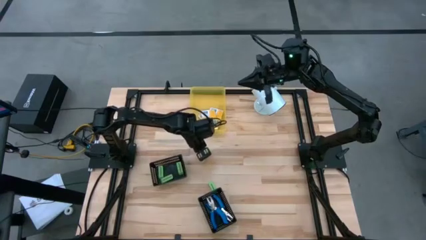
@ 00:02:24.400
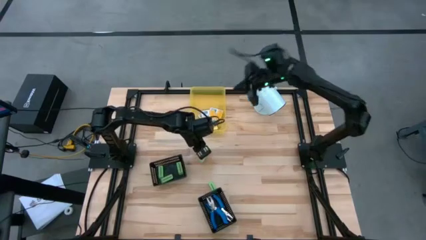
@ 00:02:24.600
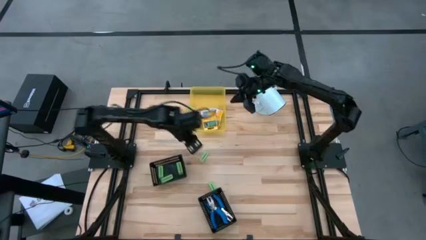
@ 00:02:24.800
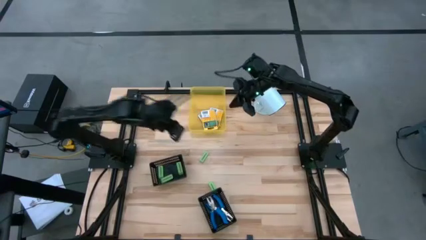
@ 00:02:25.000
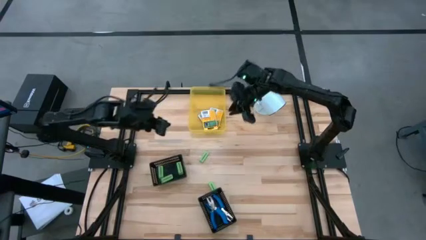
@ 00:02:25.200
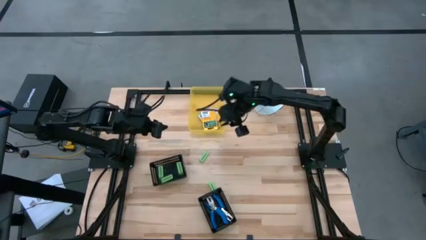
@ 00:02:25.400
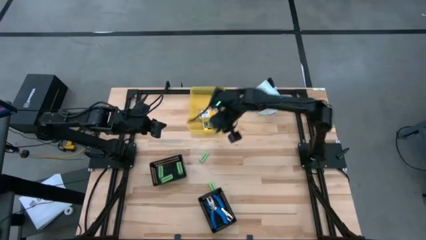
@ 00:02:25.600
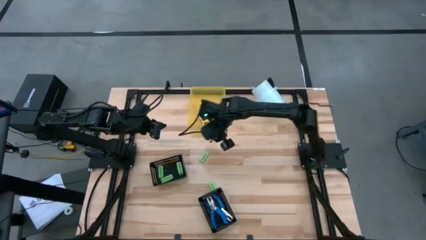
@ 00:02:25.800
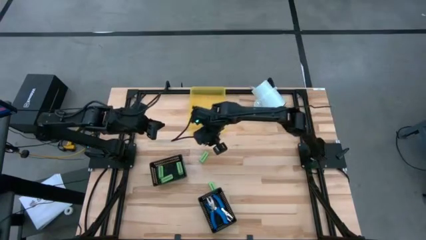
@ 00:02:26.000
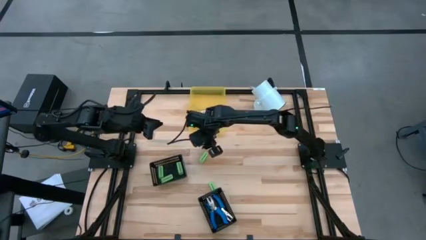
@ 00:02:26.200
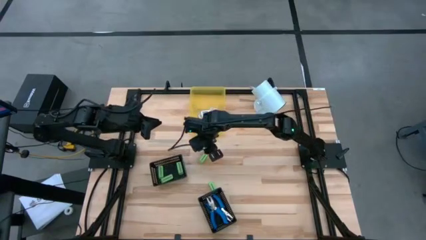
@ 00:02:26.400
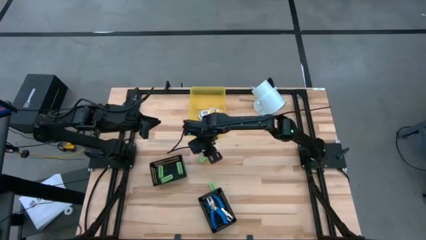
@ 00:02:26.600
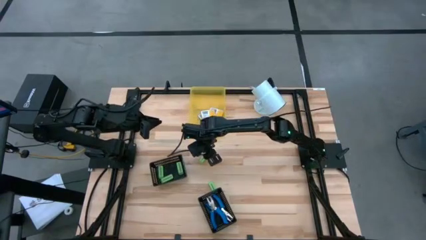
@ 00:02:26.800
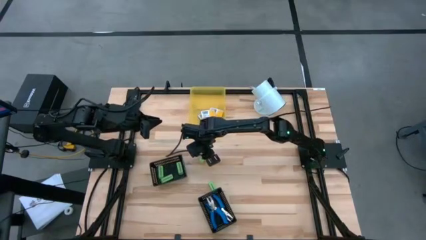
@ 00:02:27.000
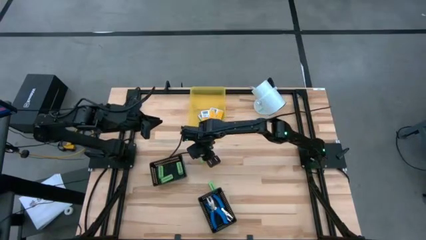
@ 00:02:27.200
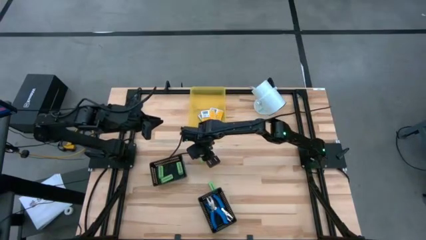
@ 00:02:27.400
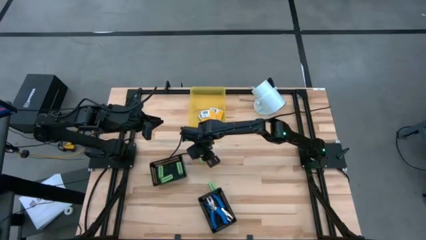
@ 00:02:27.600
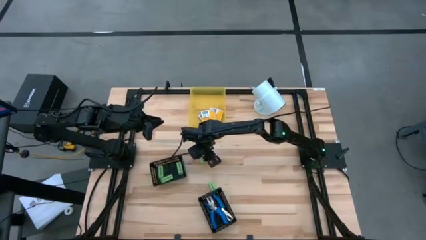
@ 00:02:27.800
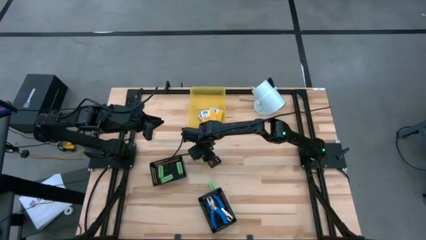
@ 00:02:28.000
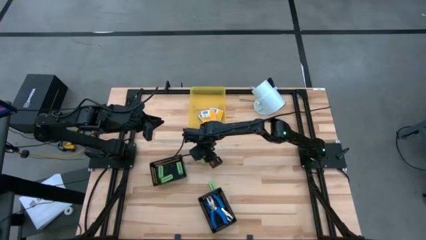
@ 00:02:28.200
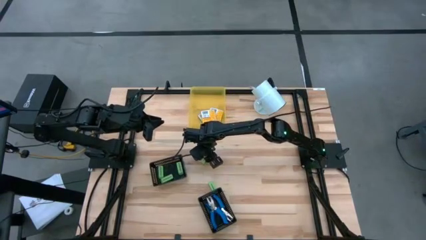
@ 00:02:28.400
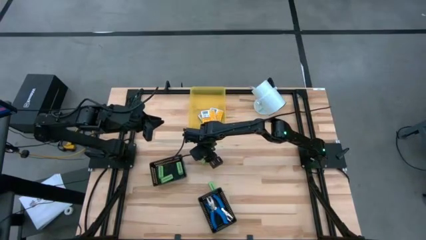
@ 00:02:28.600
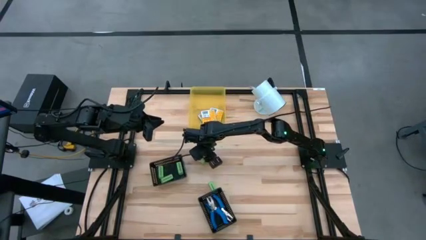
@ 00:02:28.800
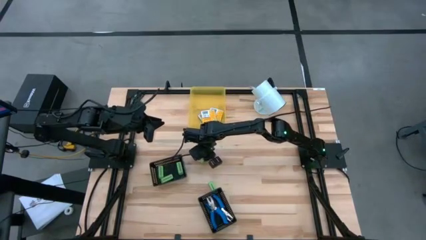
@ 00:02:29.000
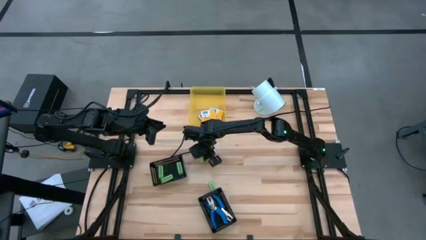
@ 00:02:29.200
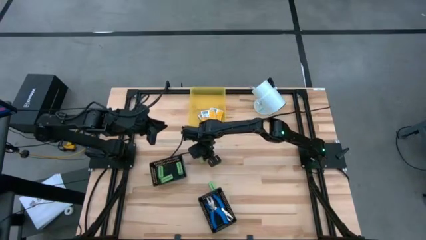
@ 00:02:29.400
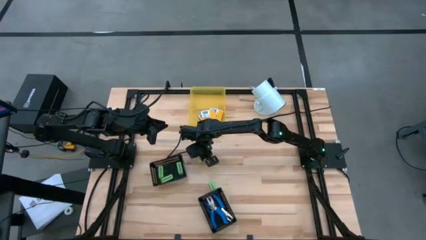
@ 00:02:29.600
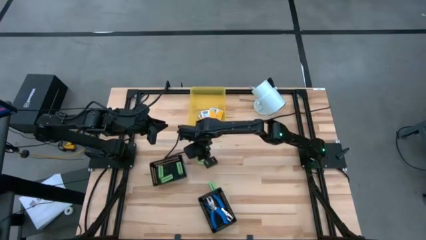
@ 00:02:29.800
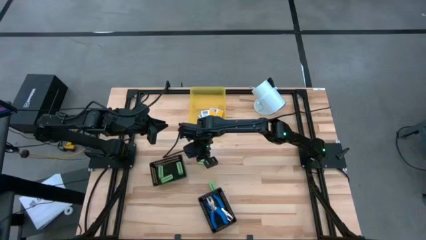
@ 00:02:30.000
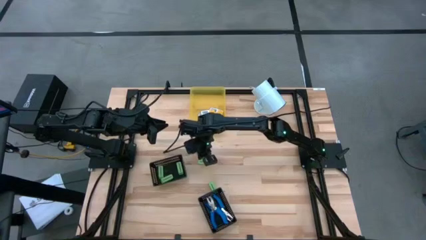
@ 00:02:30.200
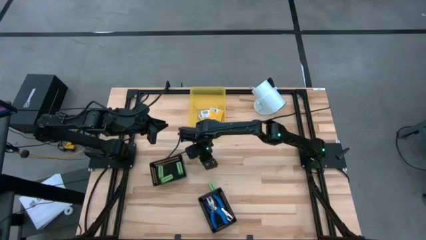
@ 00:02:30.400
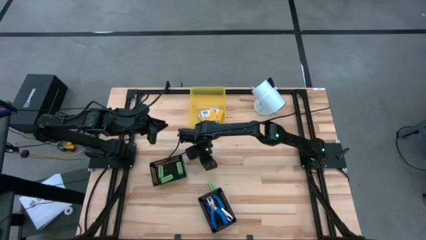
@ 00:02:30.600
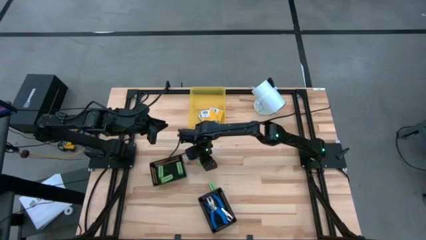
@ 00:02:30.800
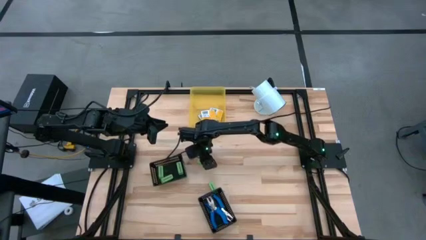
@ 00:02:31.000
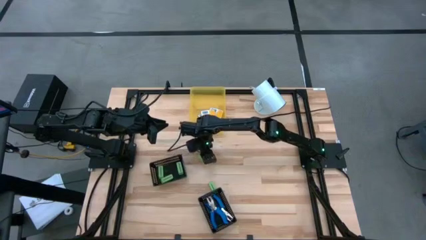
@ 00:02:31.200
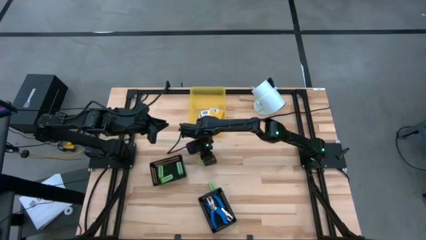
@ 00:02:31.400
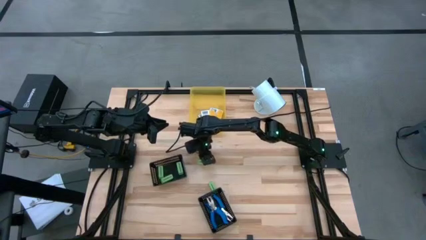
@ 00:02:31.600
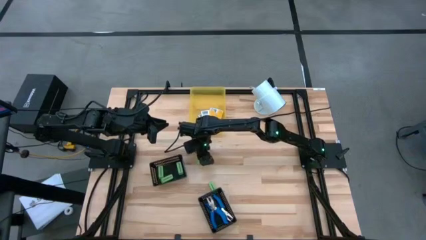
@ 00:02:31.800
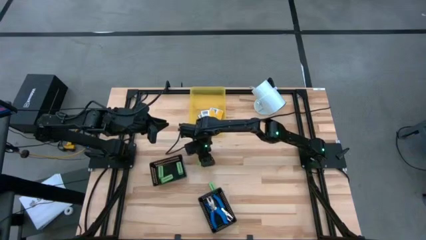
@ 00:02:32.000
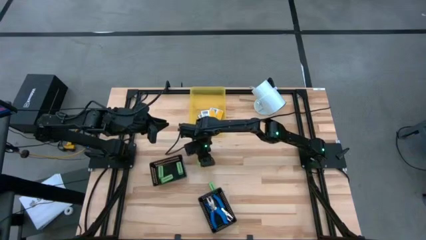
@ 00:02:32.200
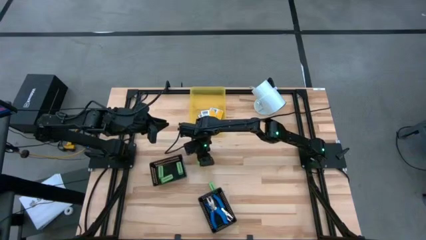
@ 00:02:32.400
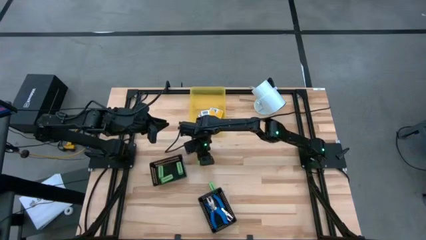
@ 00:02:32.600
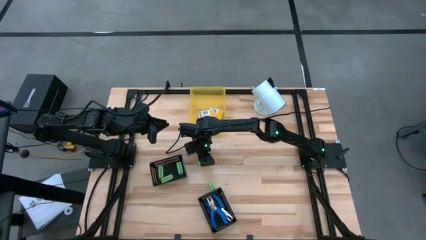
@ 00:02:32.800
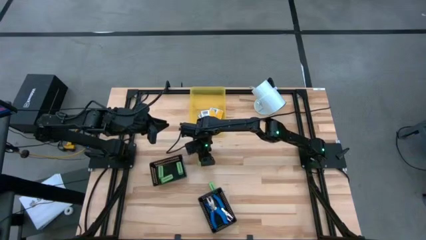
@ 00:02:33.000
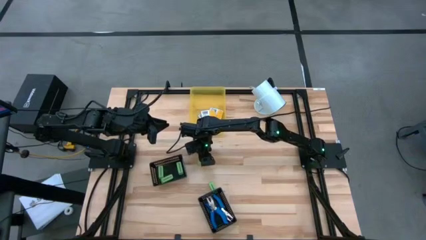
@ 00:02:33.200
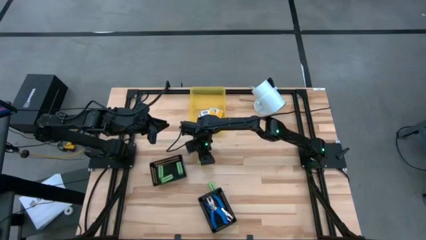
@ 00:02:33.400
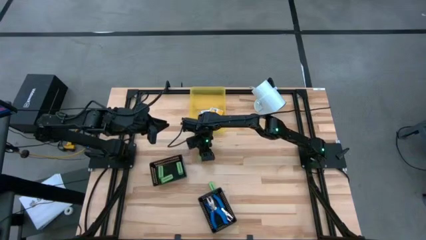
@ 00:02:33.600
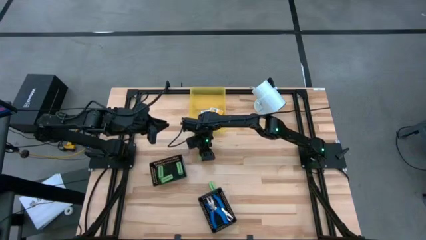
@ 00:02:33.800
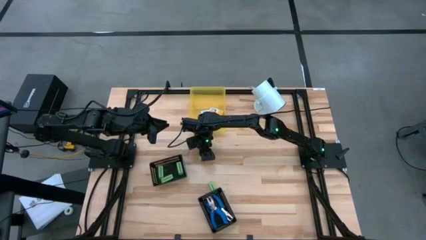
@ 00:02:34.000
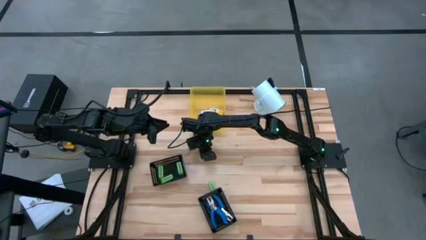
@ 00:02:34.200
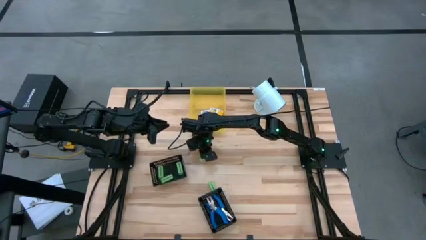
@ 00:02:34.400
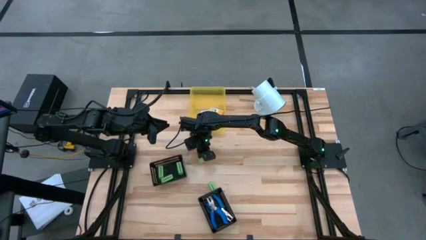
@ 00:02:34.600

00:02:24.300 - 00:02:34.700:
Task: Pick & Place School Supplies
Put the green eraser into the left black bin

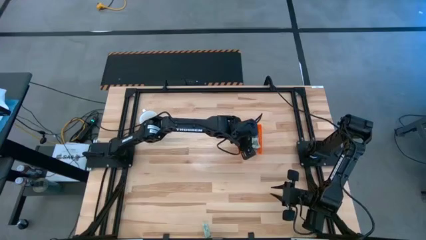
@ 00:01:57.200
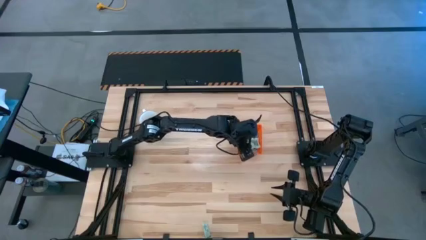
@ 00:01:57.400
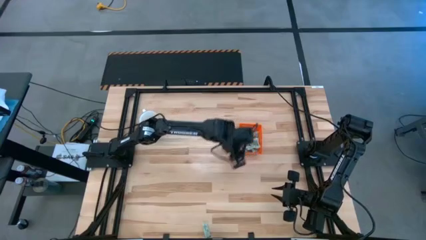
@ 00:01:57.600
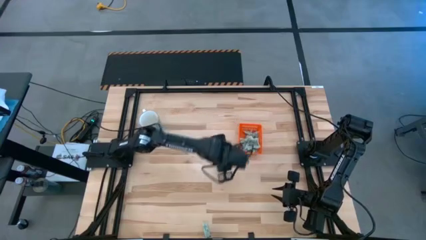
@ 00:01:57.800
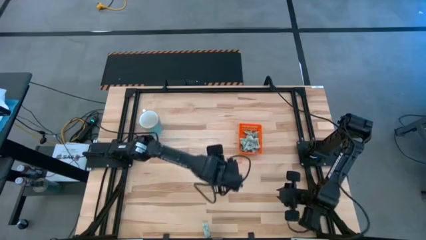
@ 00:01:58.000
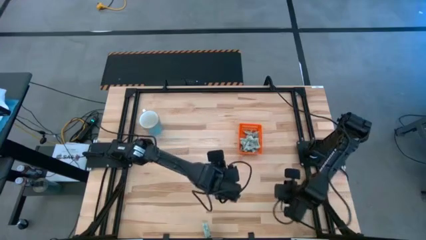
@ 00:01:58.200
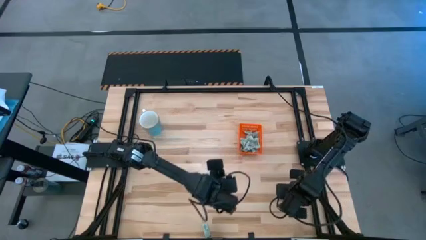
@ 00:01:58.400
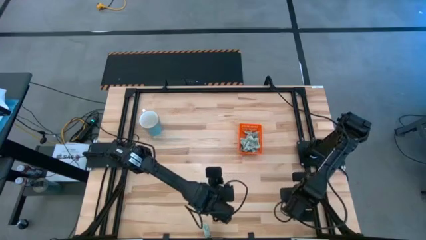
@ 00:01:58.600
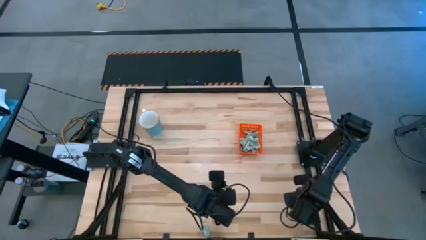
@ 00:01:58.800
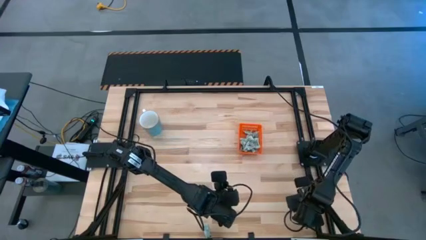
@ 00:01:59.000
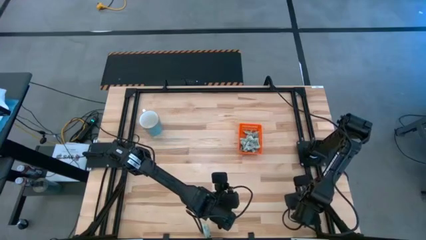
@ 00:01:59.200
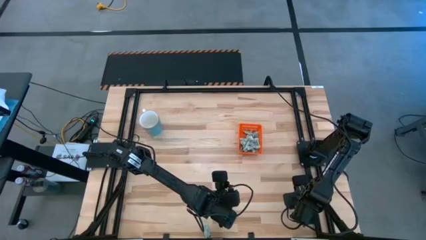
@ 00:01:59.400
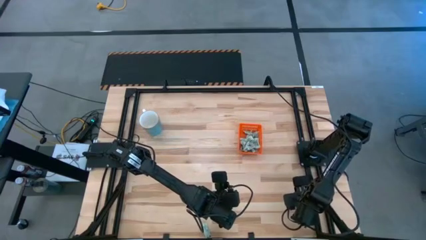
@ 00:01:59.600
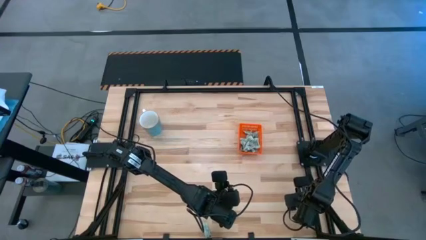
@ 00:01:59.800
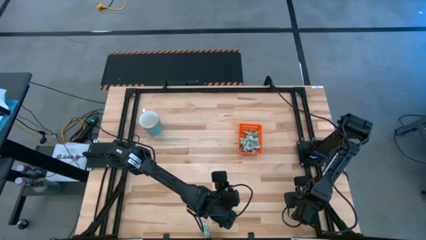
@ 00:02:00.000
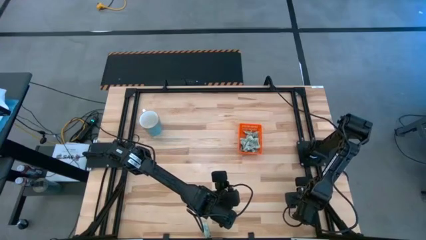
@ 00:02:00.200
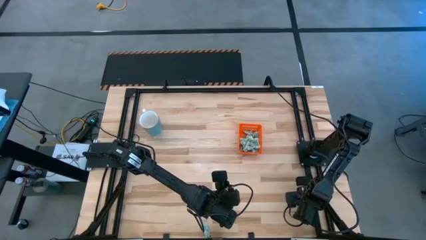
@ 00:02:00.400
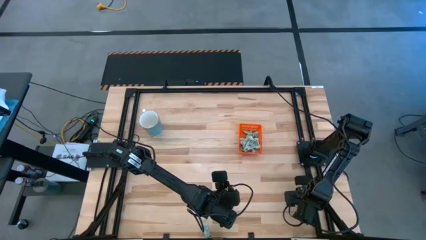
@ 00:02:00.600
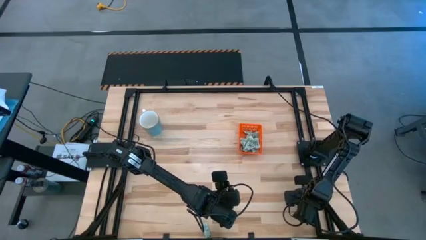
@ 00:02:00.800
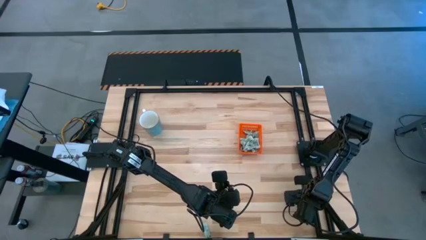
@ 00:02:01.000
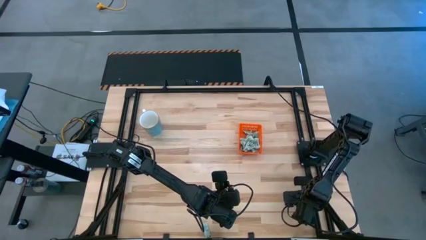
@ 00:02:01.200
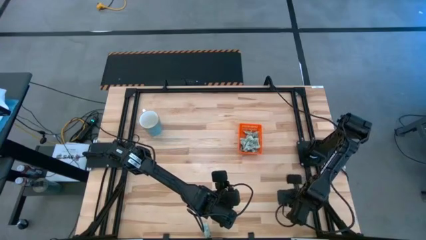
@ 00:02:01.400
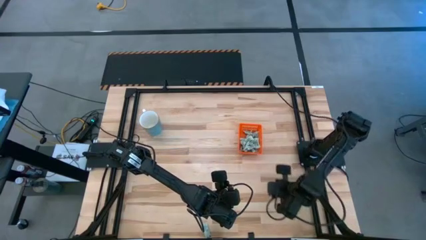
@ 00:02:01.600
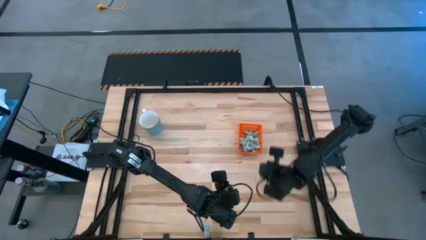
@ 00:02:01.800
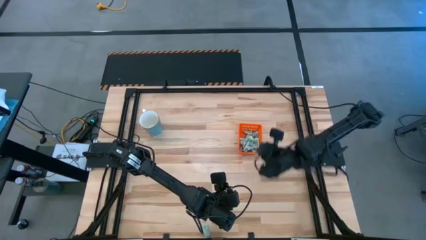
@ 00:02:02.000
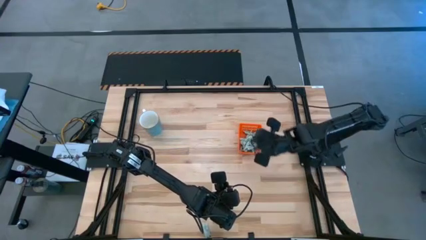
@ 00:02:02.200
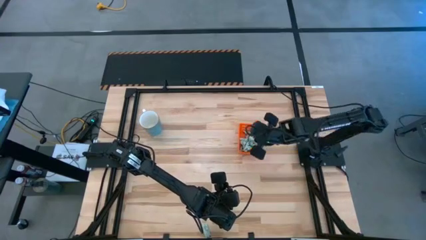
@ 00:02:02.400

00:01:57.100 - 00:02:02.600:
Task: Pick and place Stevia / Truvia into bins
Put the right stevia packet into the orange bin
